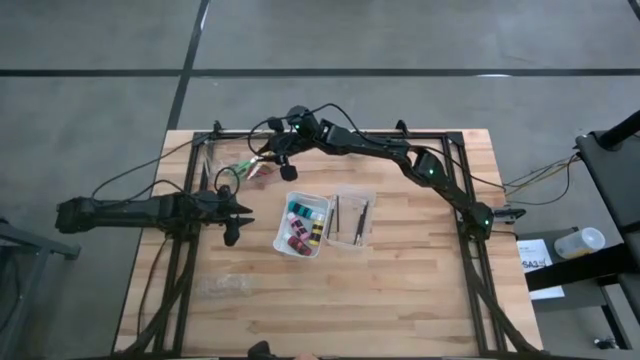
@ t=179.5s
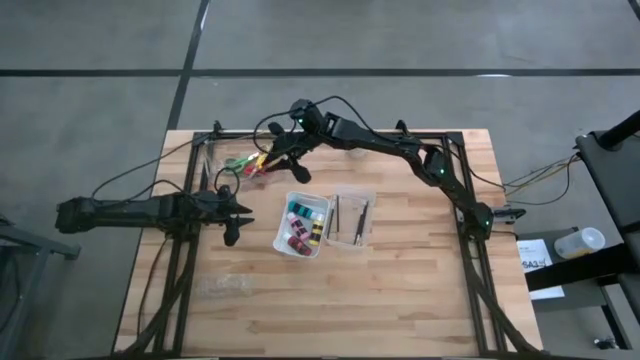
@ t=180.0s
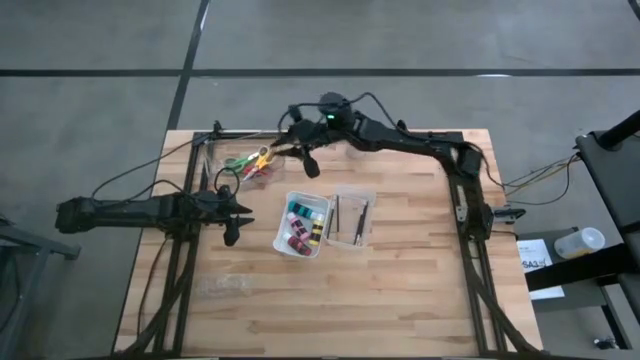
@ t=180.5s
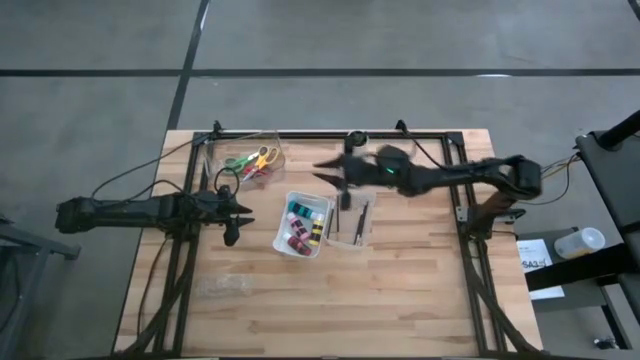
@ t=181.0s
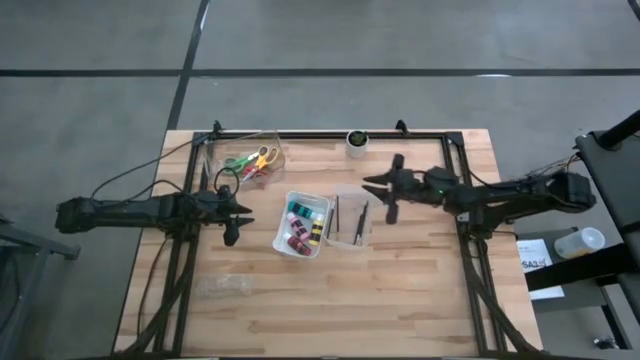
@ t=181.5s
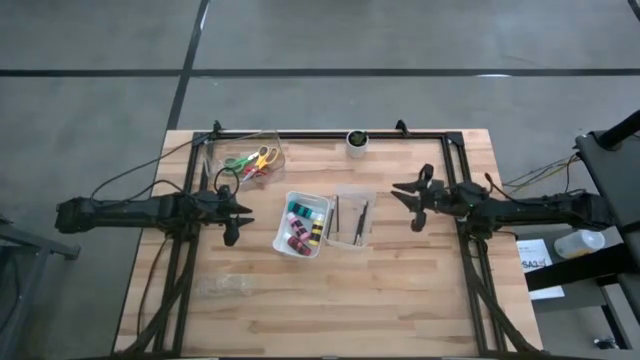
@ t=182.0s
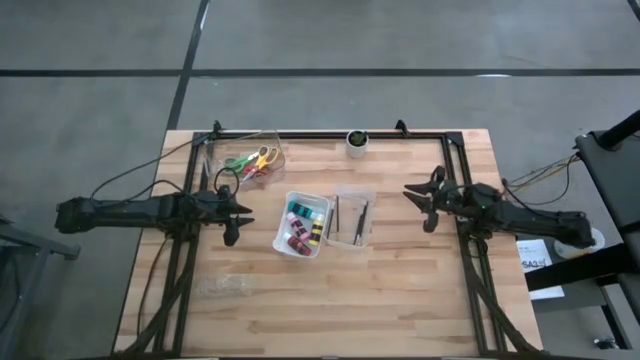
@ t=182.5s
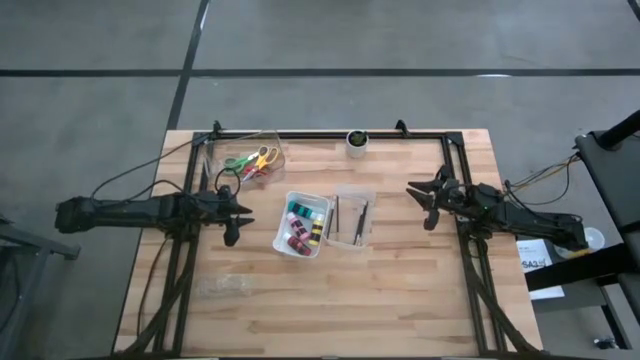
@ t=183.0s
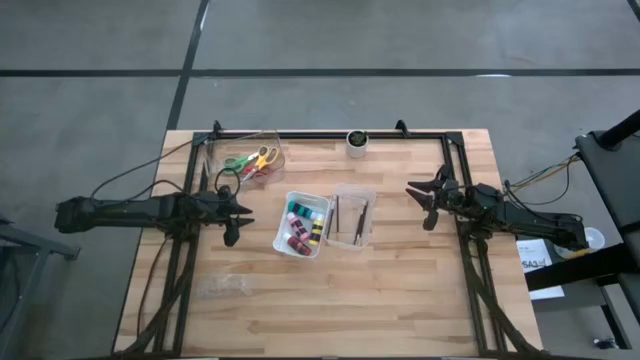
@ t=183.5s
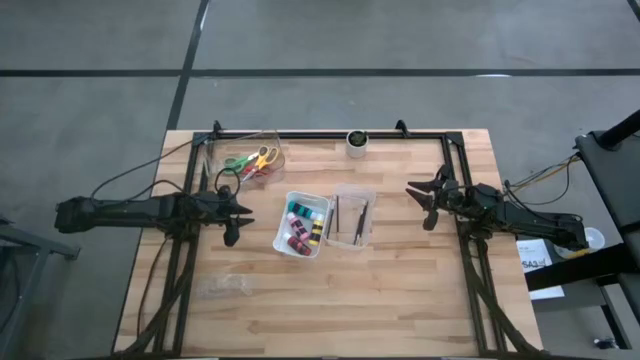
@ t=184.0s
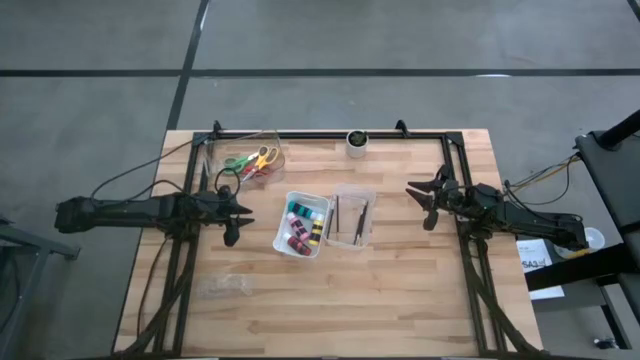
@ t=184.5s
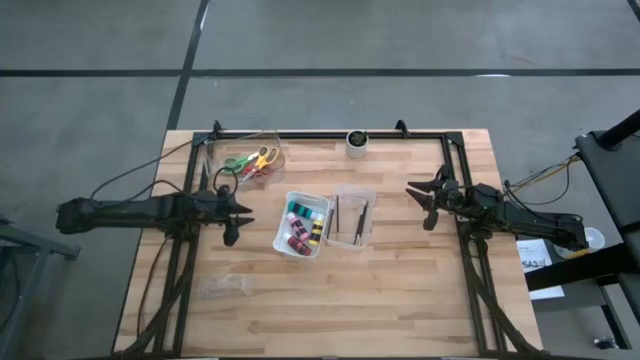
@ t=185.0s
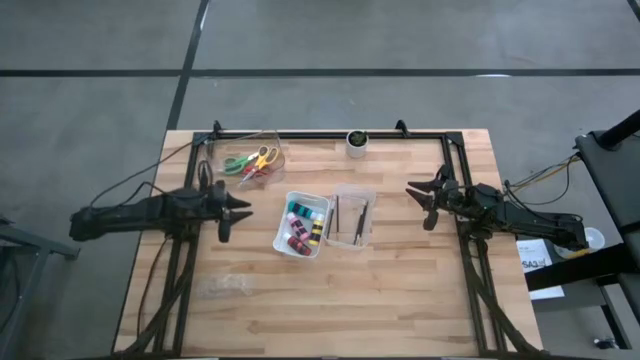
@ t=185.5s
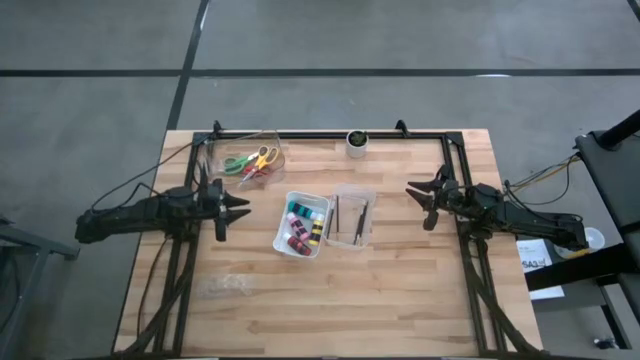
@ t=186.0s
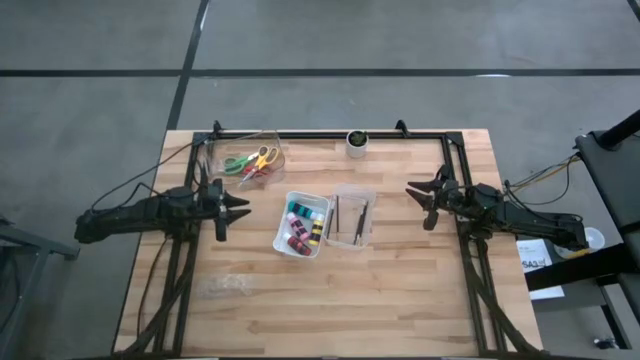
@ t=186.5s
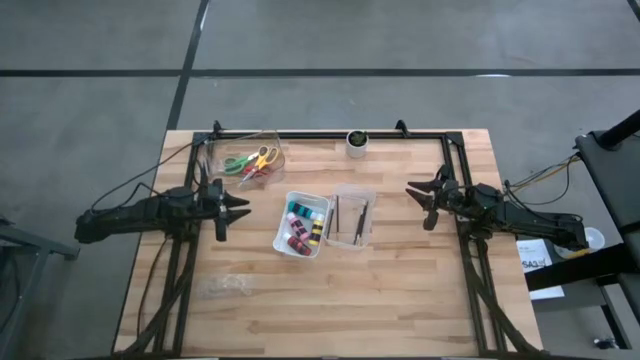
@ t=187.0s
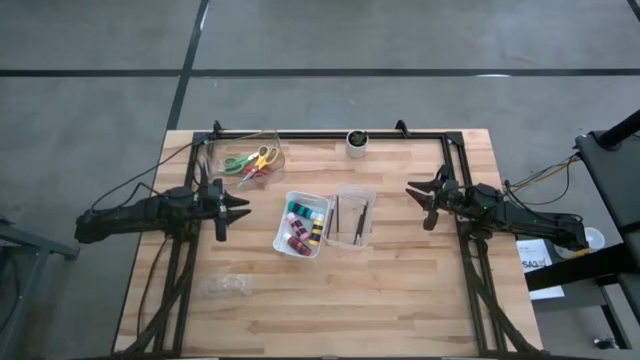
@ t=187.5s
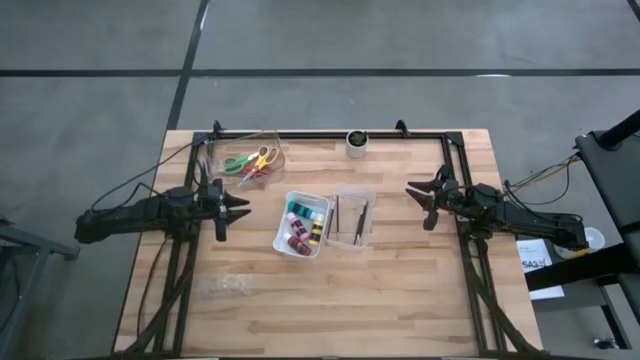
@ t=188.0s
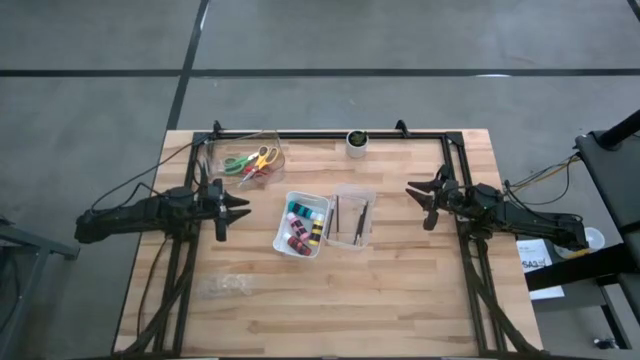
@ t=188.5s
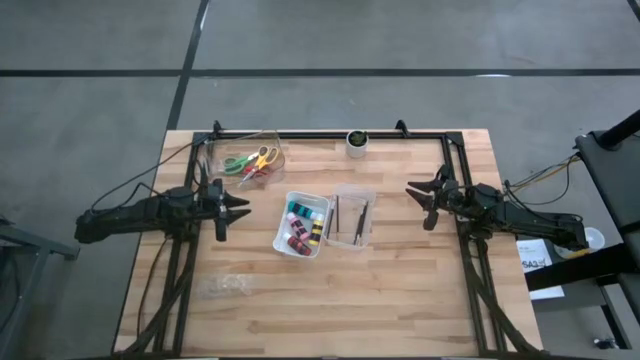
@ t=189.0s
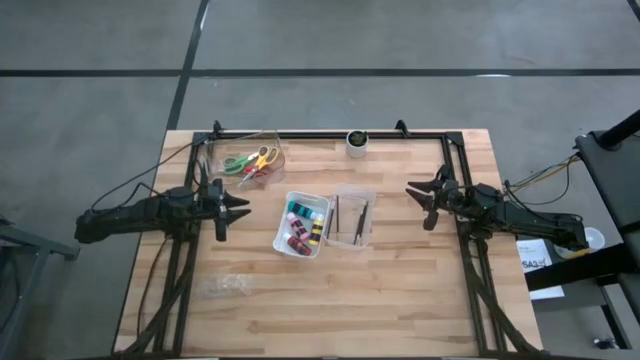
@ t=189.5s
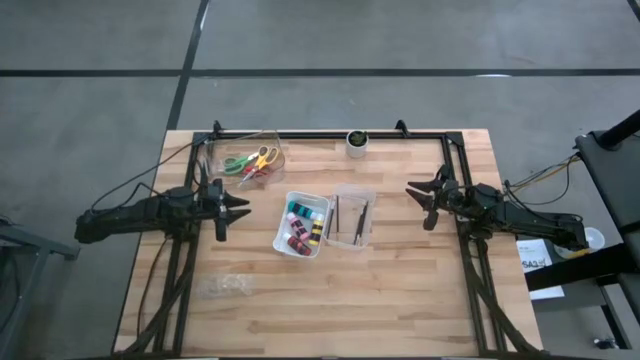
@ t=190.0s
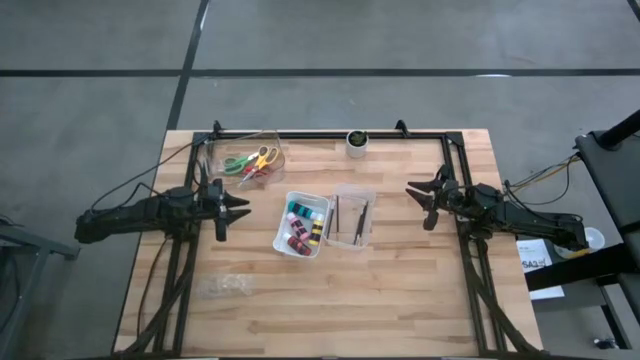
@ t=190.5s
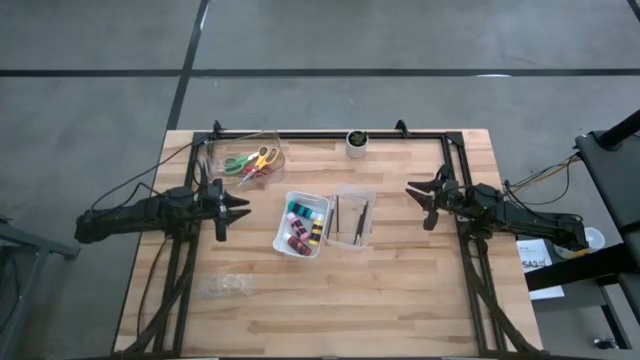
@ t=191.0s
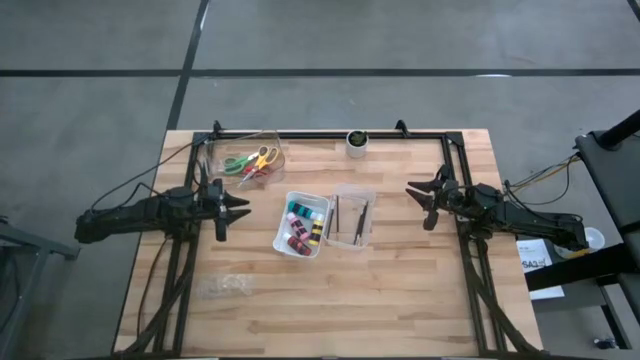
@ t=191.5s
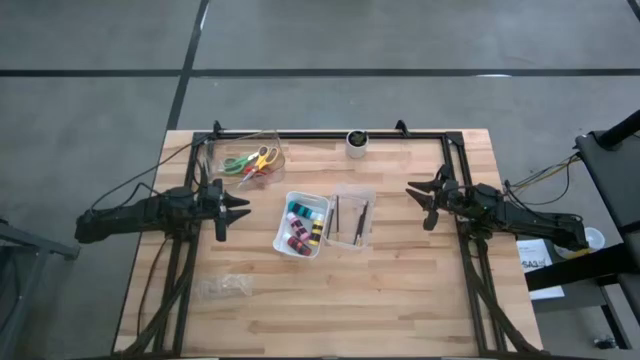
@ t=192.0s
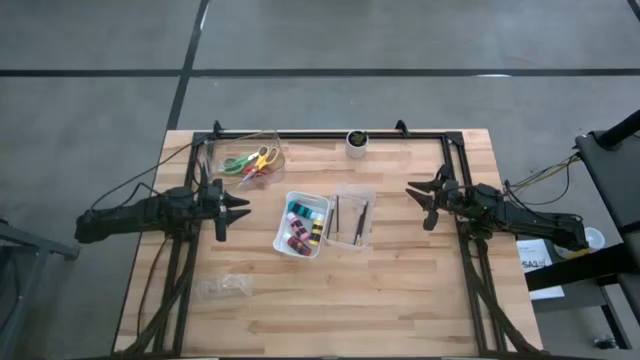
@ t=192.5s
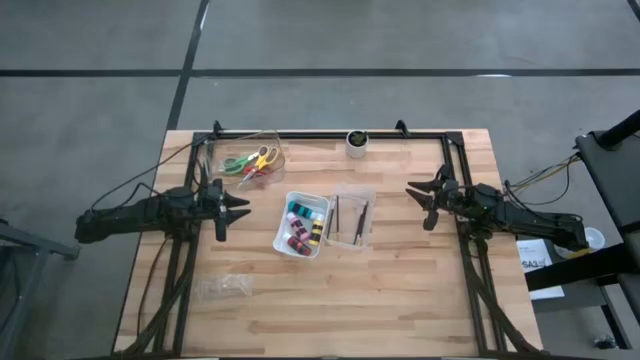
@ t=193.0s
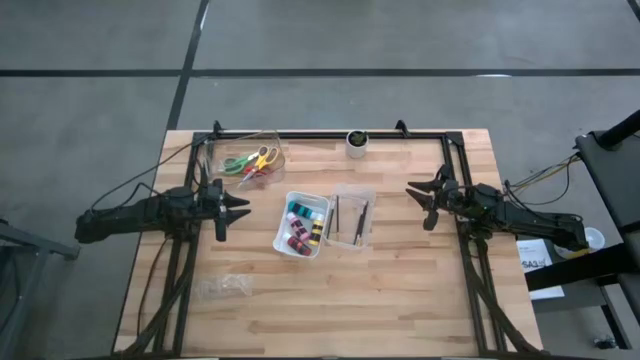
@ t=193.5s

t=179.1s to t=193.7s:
Task: Pick & Place Paint Supplies
Return to Home Position

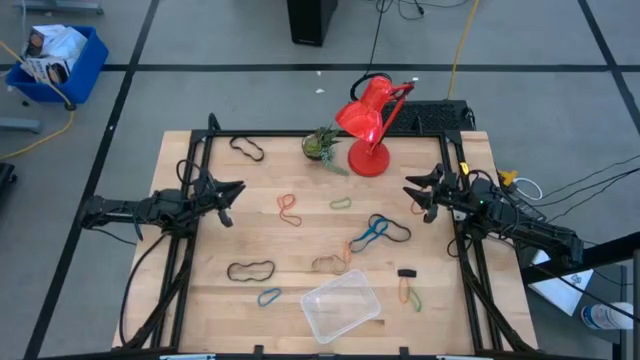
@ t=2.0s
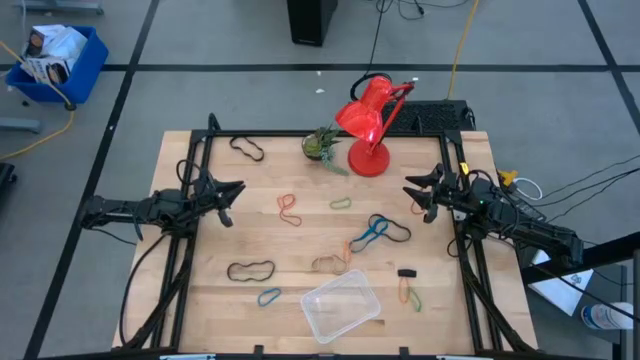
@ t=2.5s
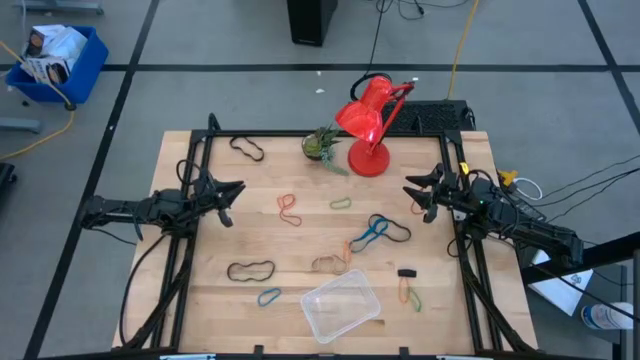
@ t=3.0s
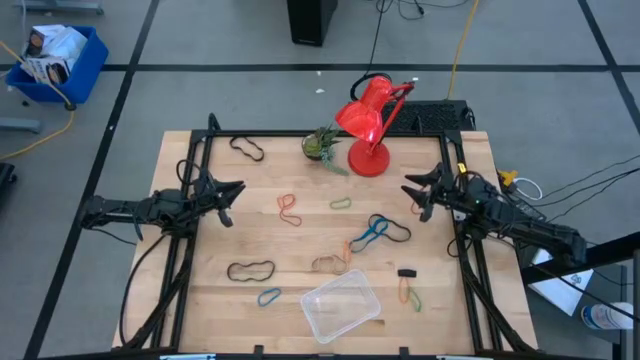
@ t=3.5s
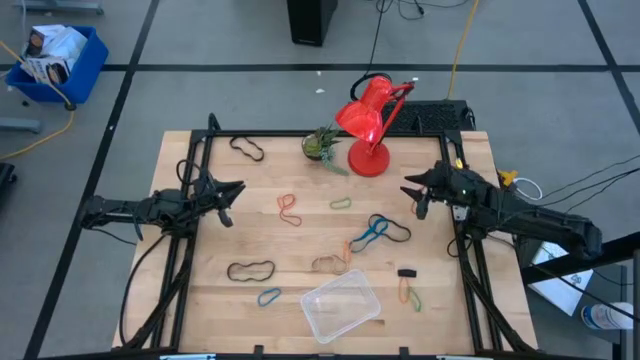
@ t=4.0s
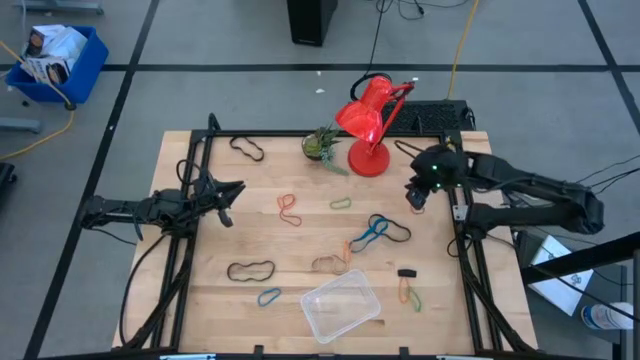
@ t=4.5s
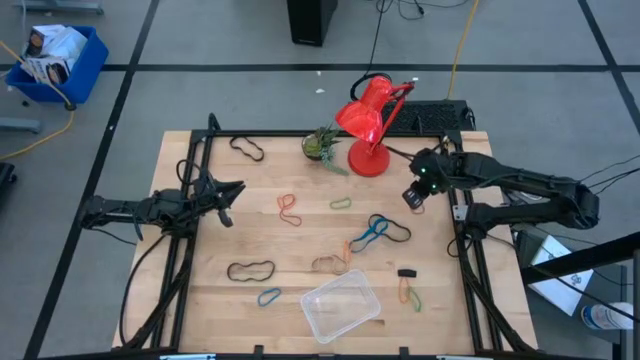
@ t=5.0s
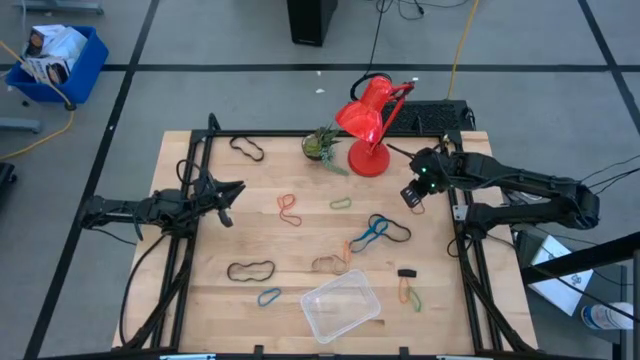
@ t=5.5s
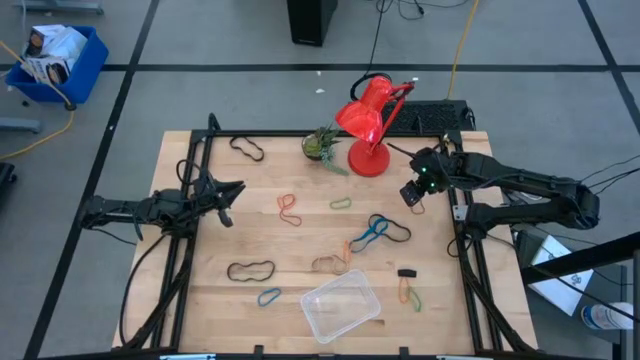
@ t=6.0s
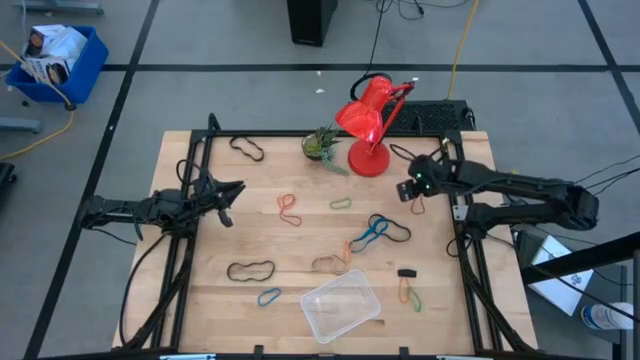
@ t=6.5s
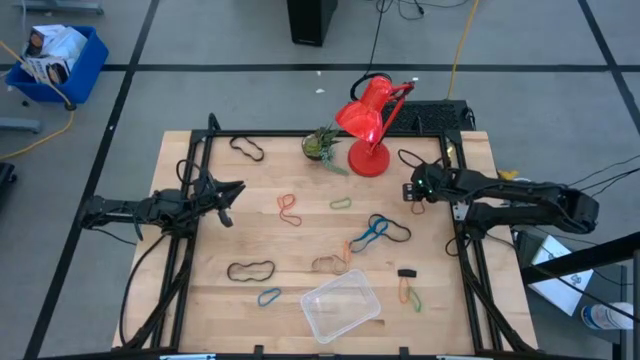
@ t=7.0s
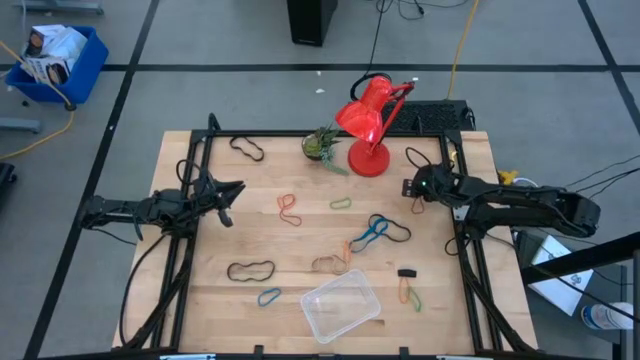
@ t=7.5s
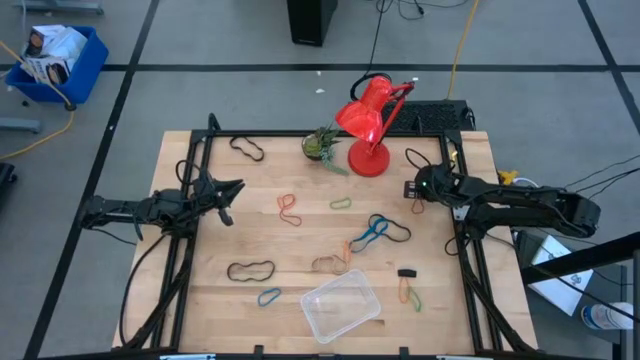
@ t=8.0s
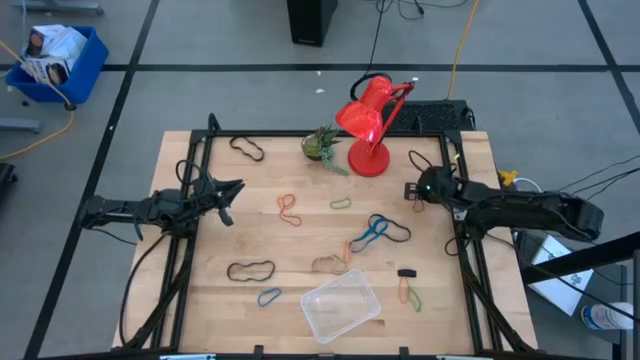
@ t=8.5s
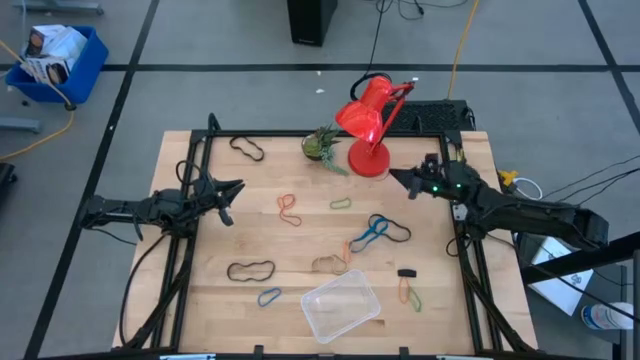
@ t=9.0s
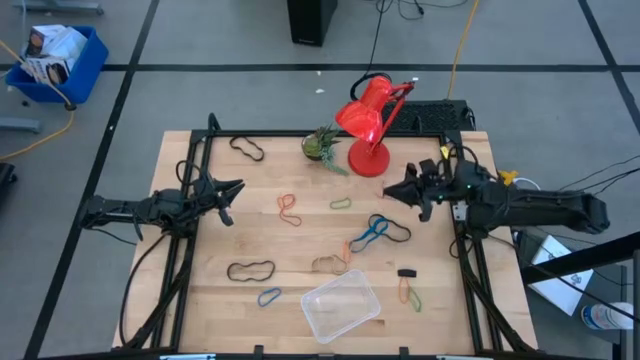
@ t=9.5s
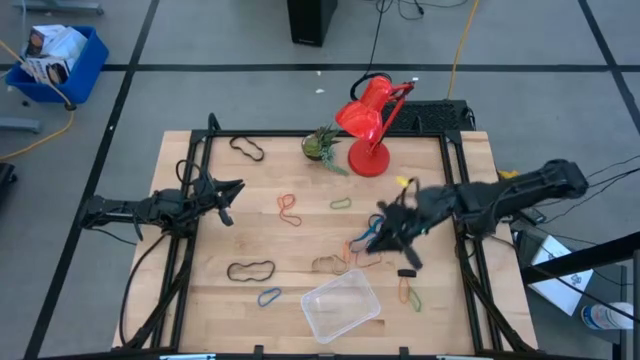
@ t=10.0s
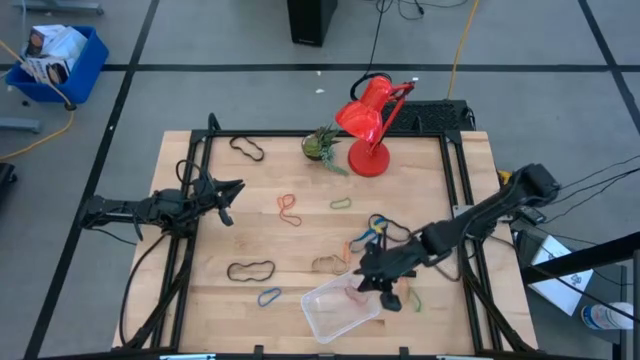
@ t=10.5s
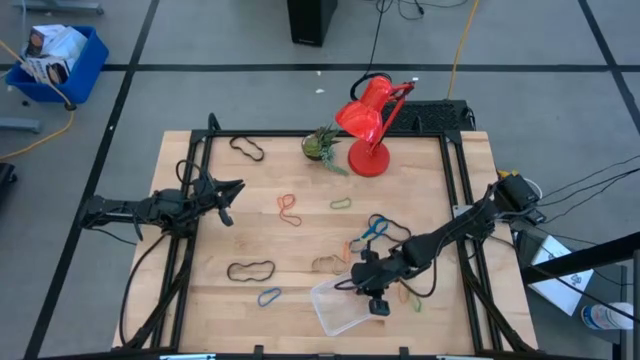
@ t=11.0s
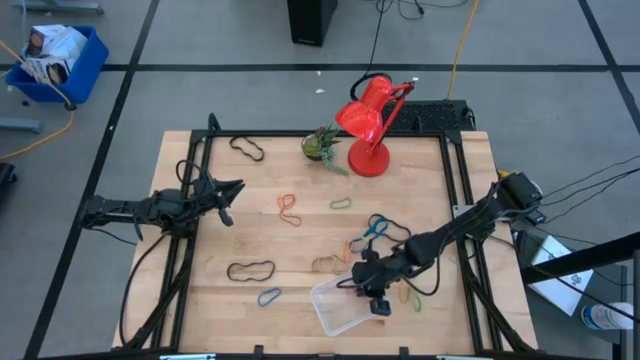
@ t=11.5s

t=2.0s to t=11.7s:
Task: Pick and place rubber bands into bin
Put the red rubber band into the transparent container
